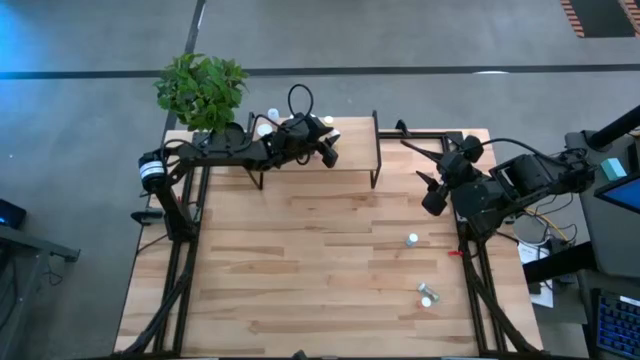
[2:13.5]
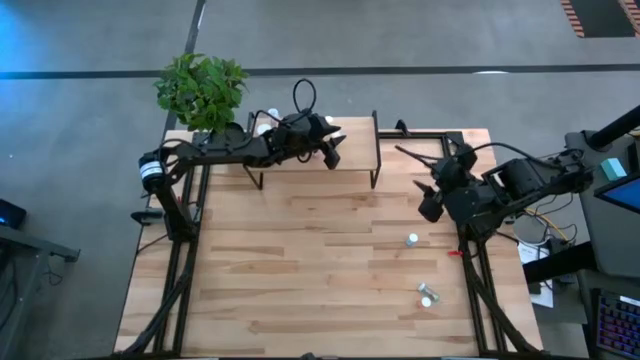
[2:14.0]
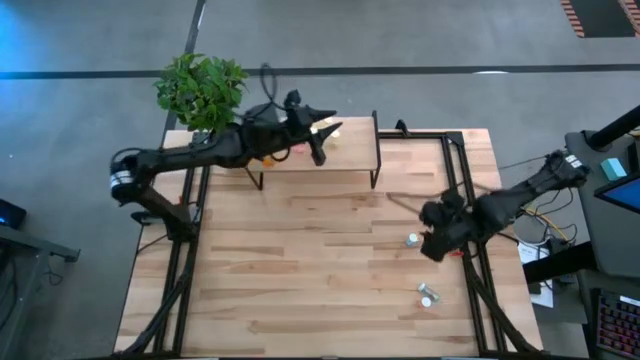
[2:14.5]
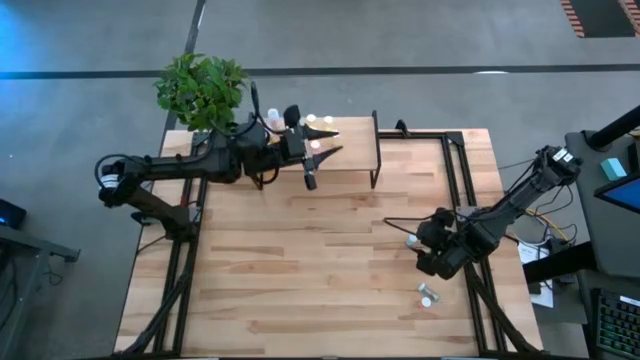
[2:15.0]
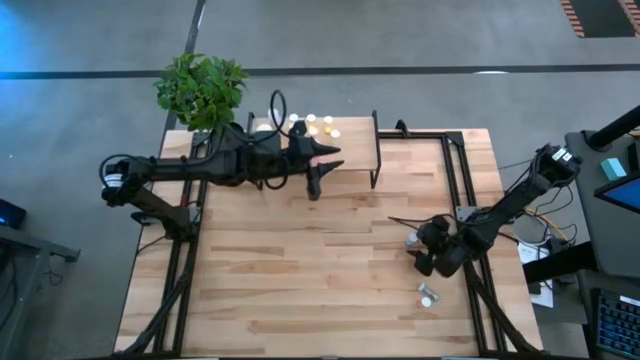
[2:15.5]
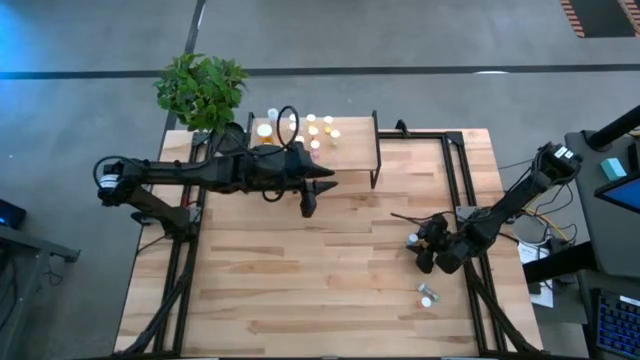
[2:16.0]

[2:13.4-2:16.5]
Task: Pick and place medicine bottles onto shelf by color
Put the blue pill bottle on the shelf

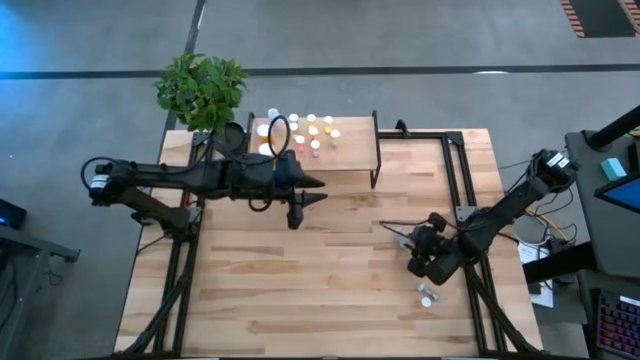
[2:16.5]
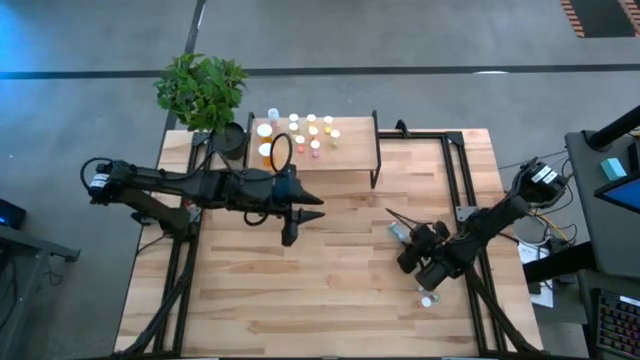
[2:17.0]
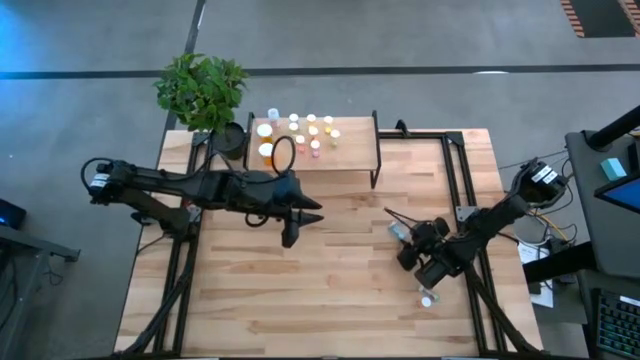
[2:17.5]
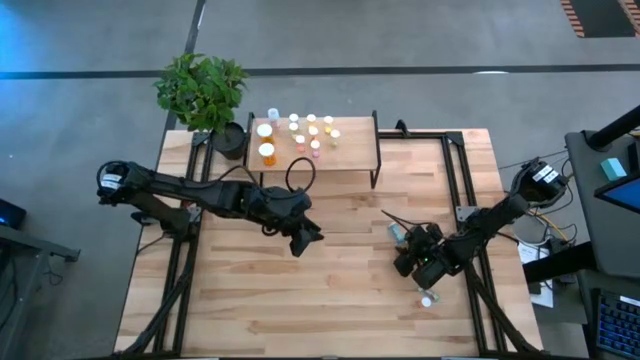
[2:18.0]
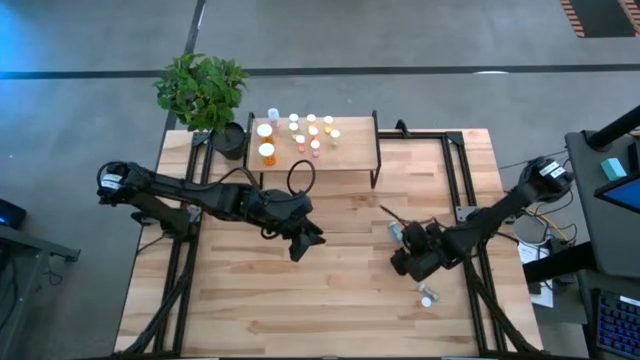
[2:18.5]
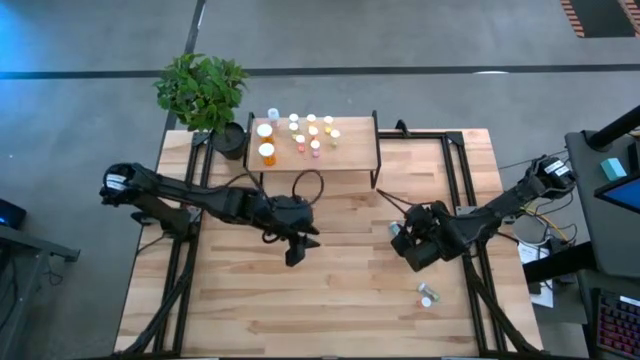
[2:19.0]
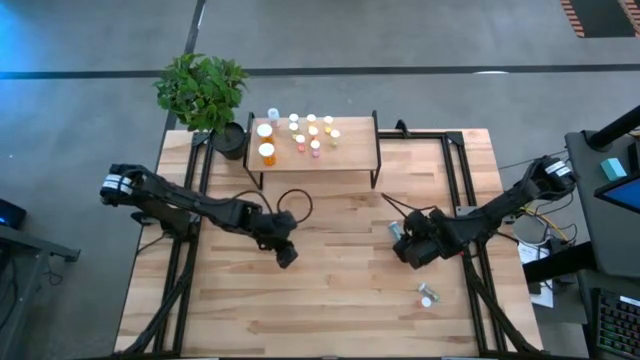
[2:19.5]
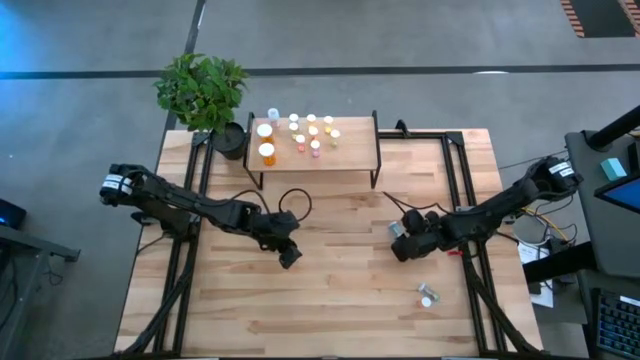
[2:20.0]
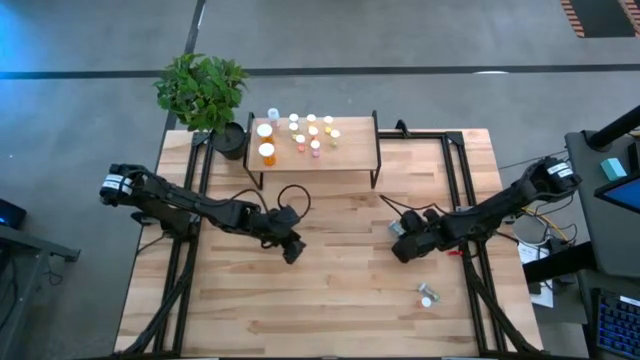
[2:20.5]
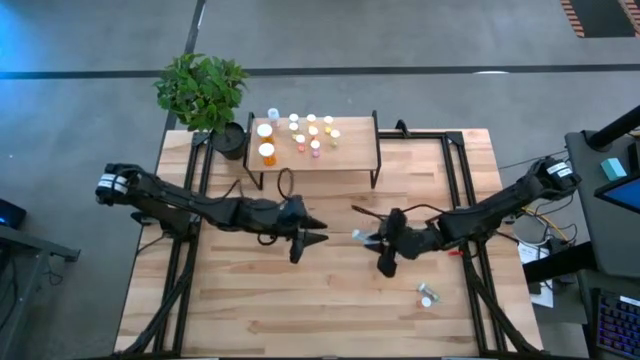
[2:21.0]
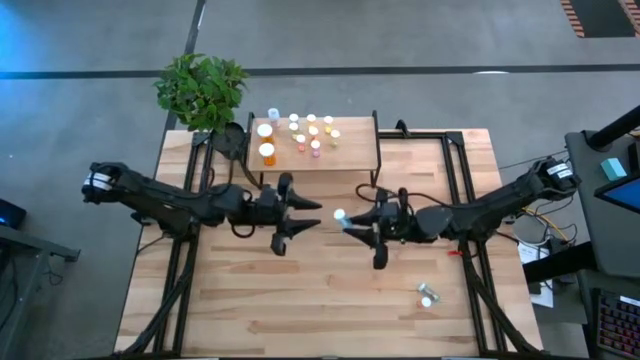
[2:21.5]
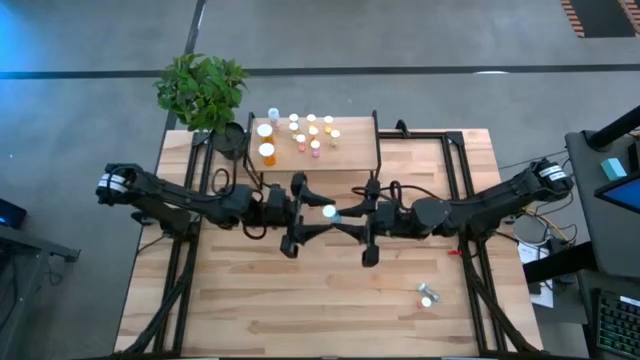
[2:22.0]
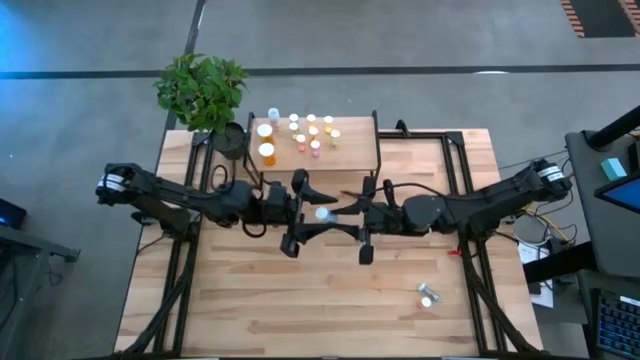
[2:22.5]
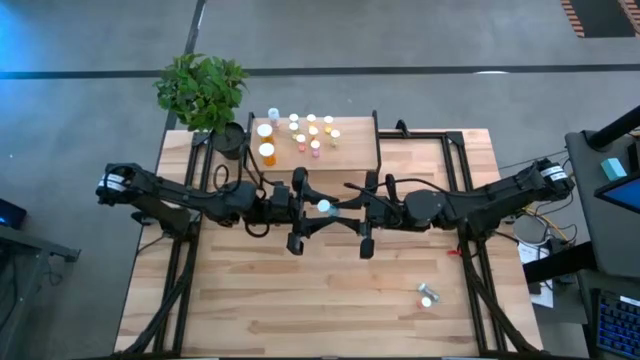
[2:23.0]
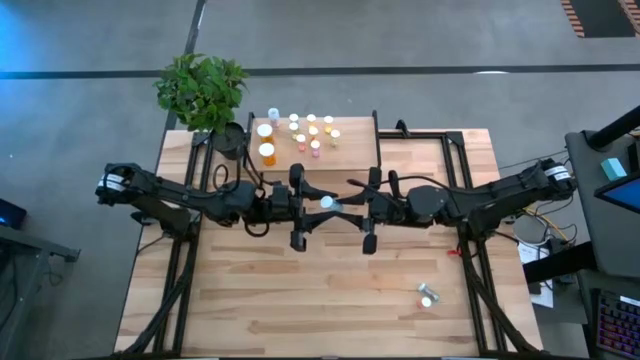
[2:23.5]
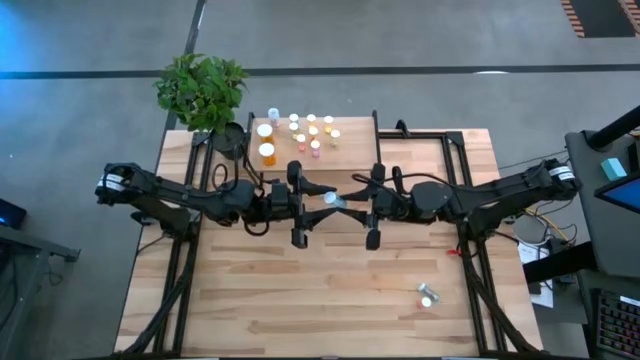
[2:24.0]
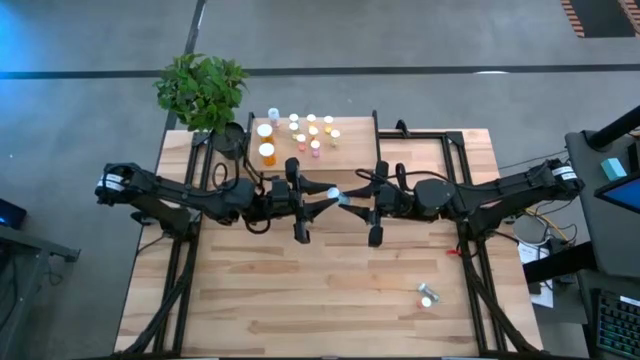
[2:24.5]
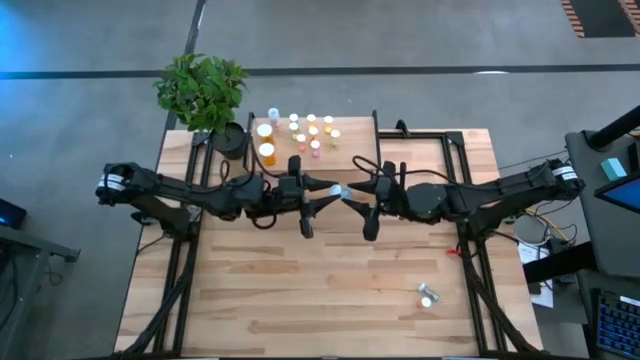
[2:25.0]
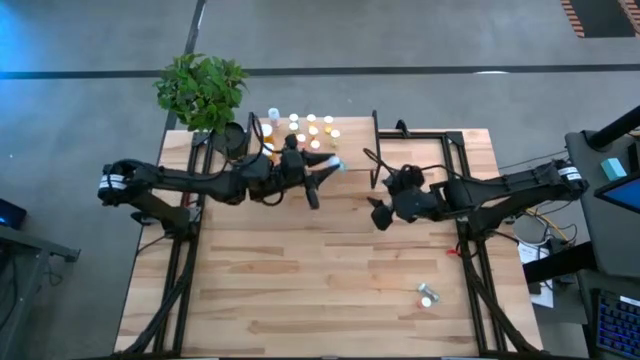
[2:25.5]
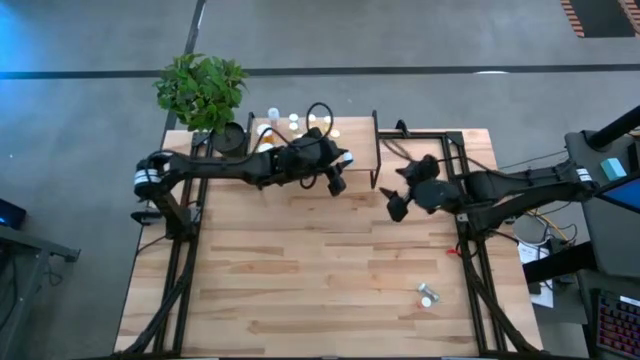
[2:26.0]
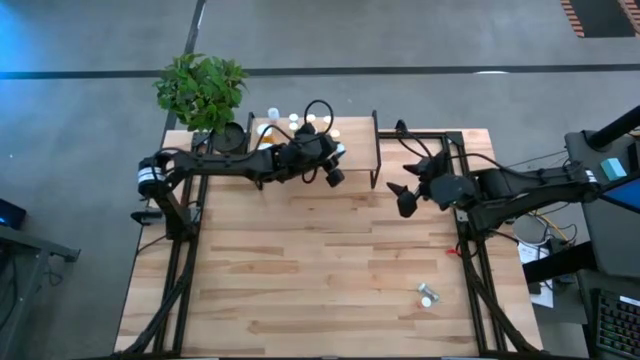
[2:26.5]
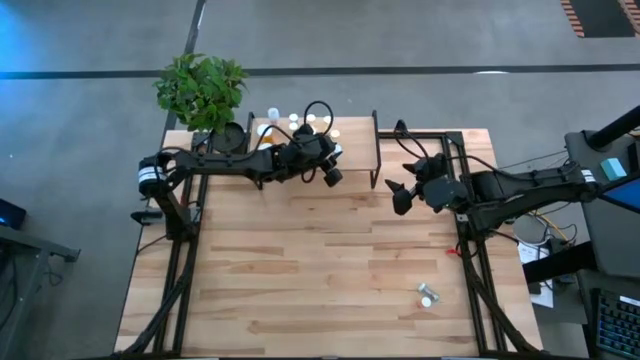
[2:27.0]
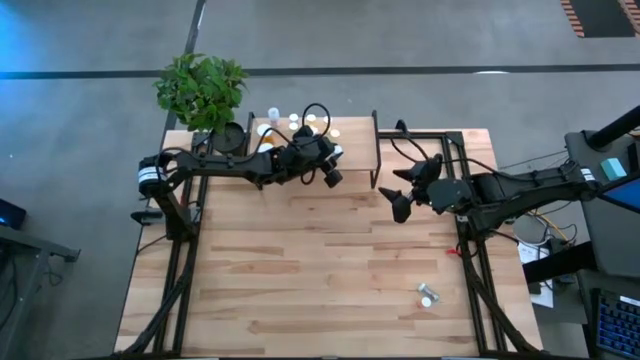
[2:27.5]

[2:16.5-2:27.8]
Put the blue pill bottle on the shelf

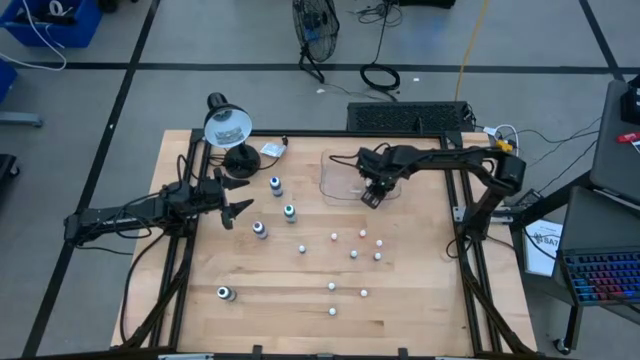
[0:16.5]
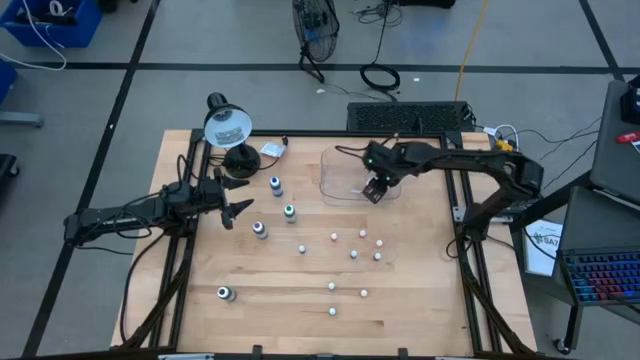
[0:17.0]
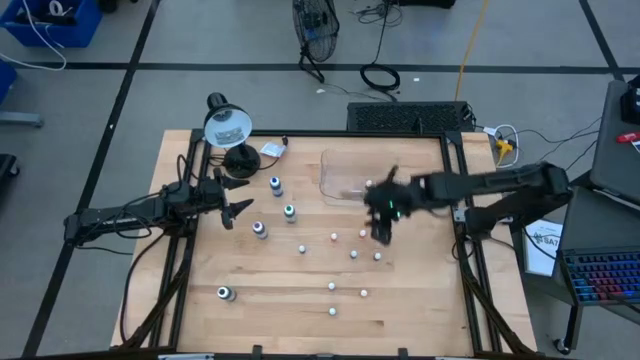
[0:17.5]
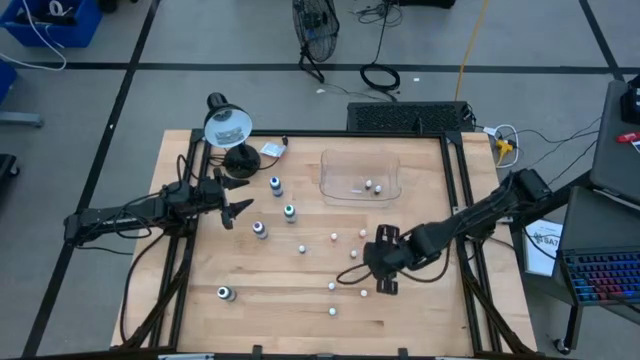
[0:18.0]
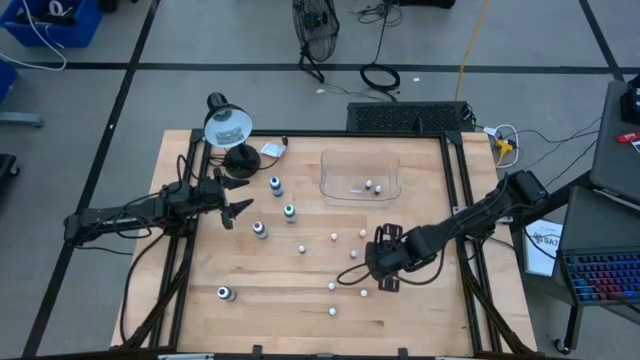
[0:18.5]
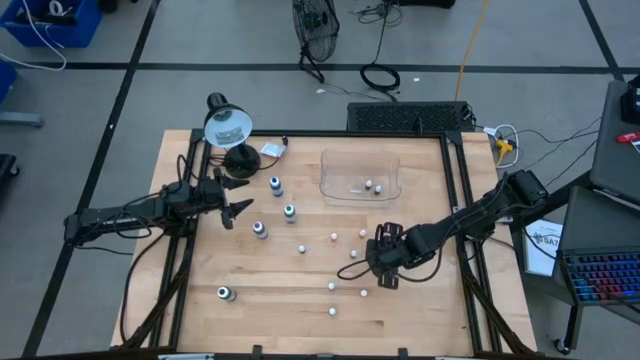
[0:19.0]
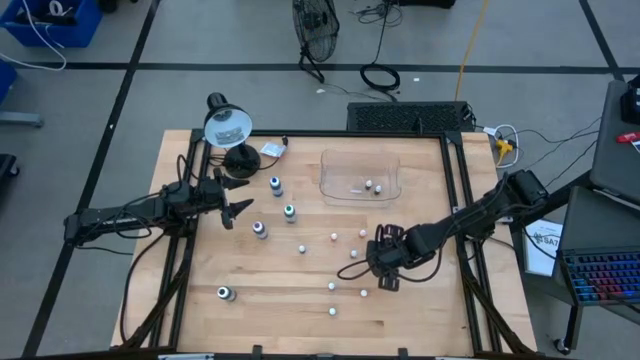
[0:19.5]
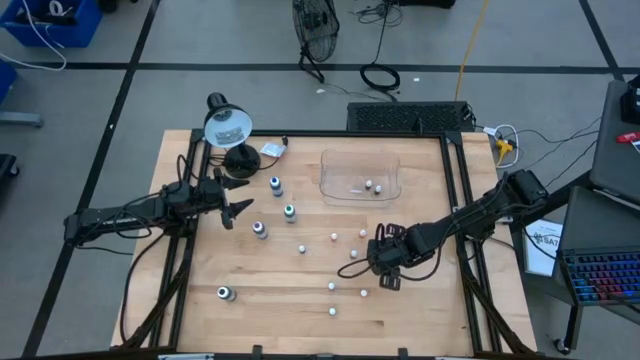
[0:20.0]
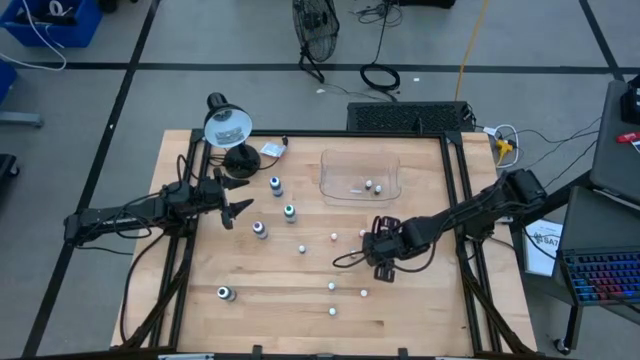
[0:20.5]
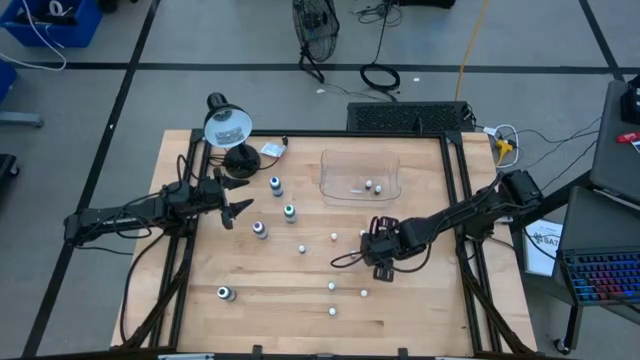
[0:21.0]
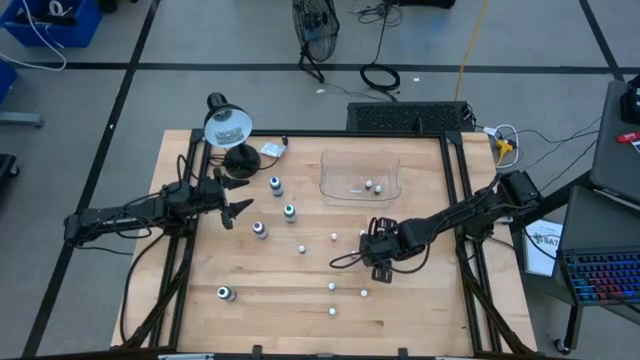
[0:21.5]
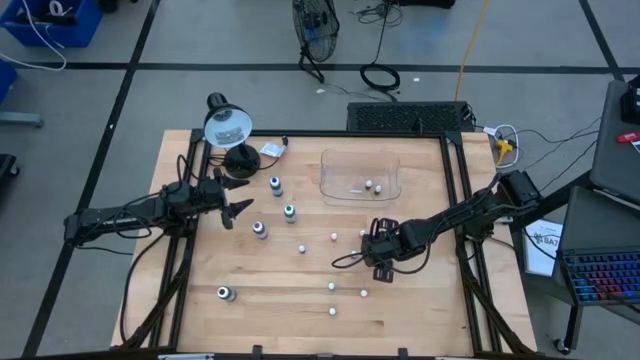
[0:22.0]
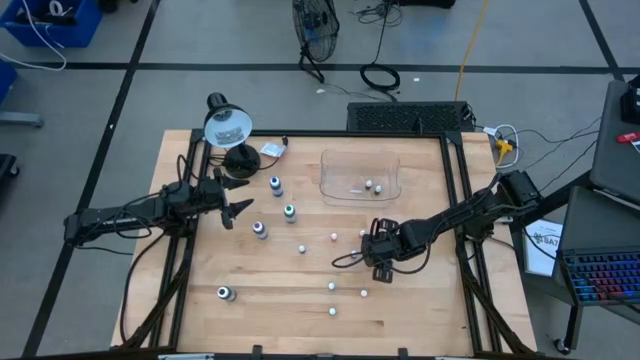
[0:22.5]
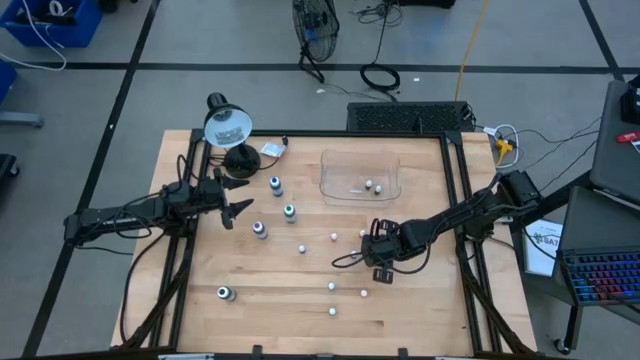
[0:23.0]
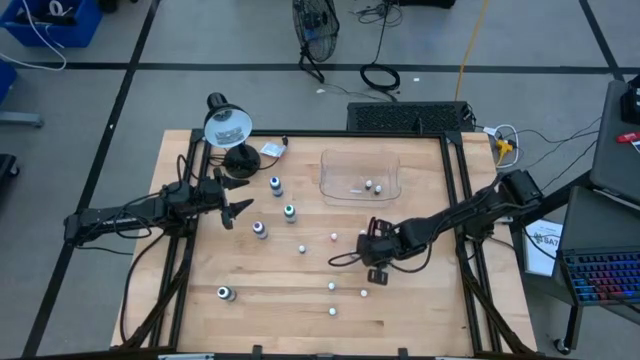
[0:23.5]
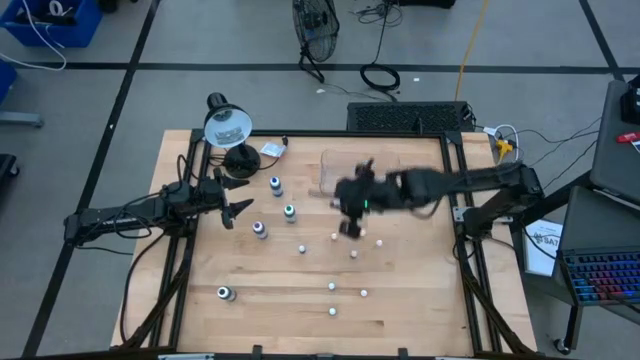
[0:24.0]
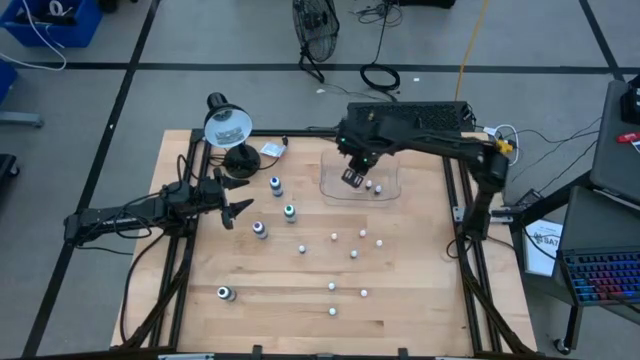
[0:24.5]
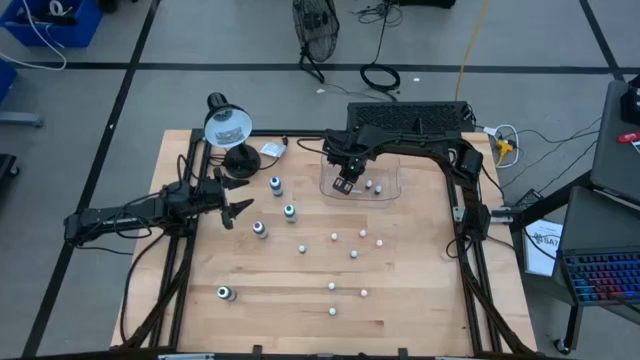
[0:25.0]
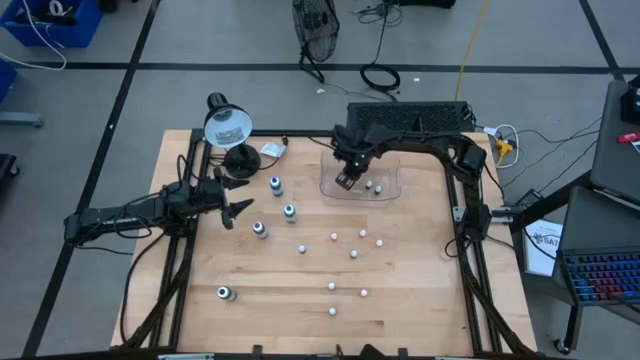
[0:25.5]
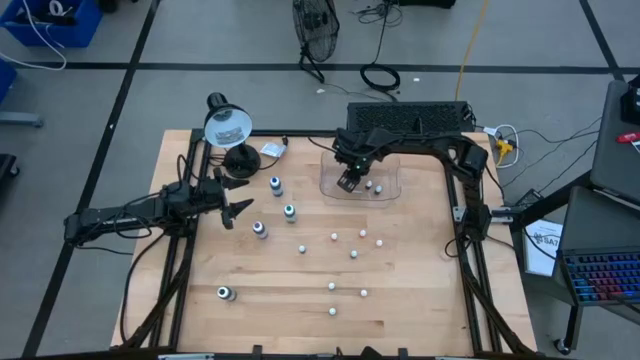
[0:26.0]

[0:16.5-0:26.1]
Task: Pick & Place food coloring
Put the top purple food coloring into the transparent bin
